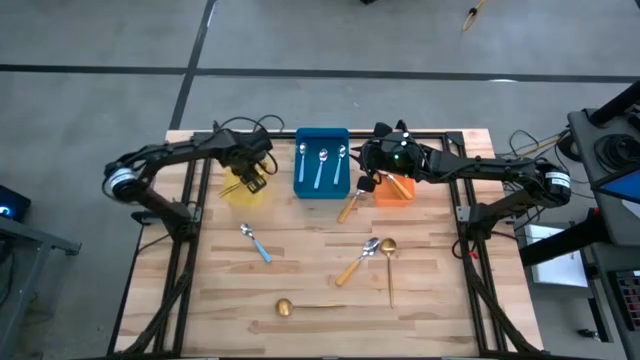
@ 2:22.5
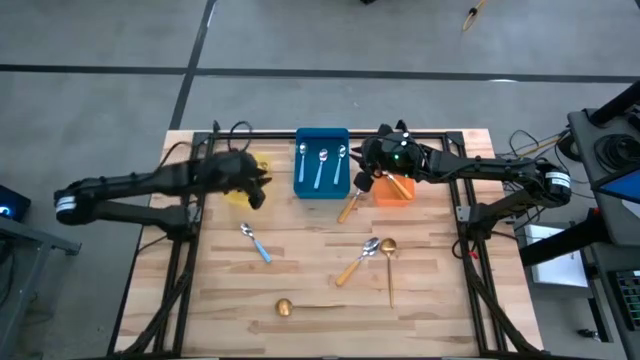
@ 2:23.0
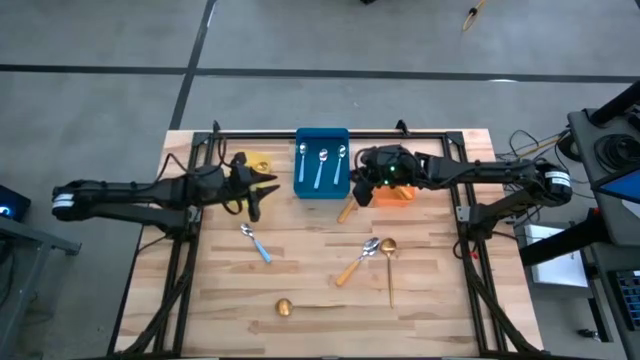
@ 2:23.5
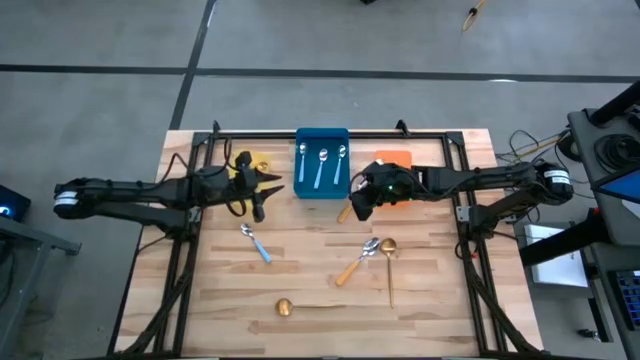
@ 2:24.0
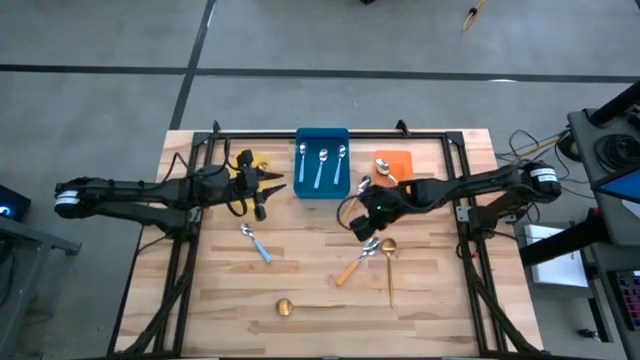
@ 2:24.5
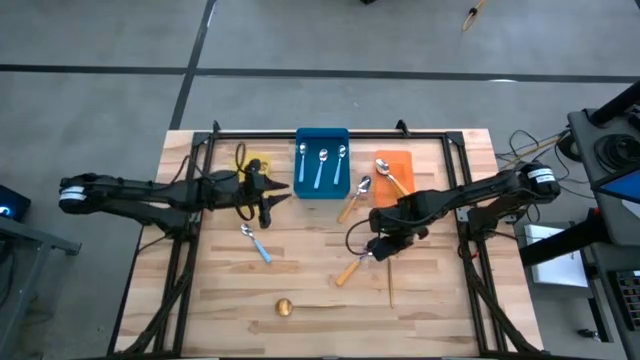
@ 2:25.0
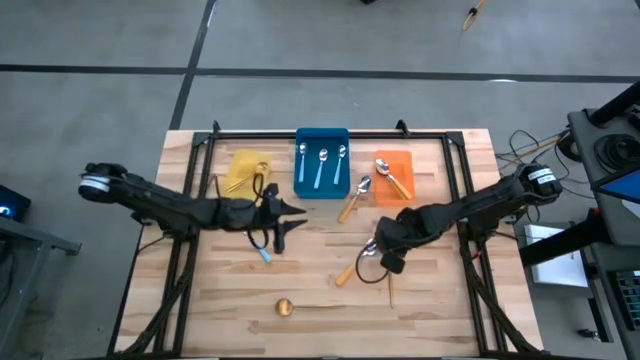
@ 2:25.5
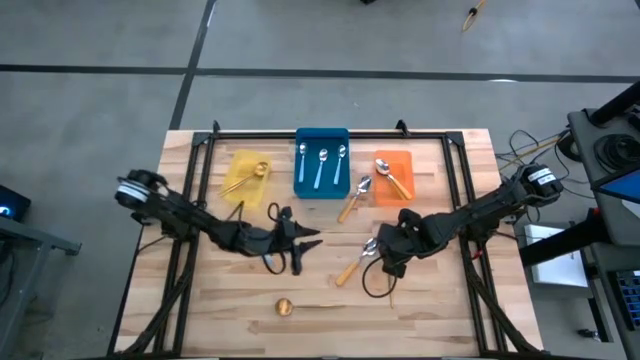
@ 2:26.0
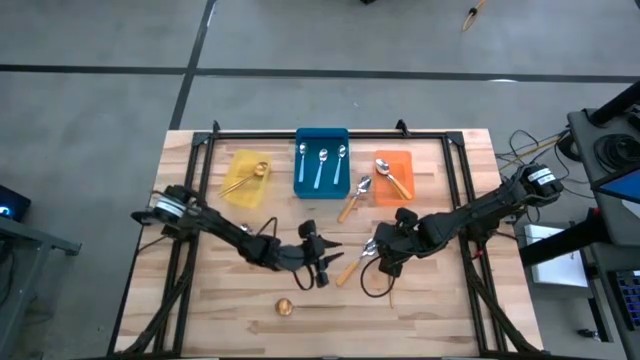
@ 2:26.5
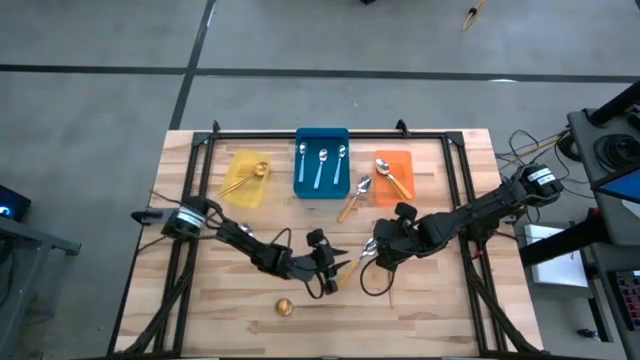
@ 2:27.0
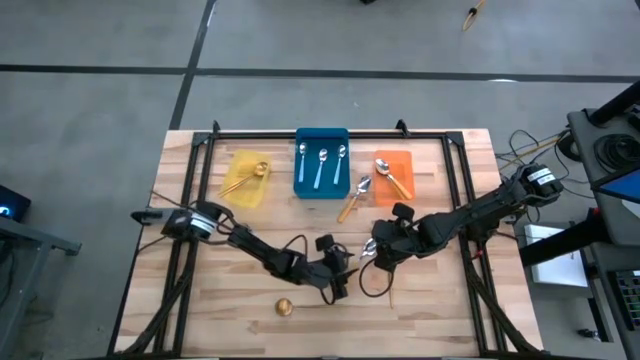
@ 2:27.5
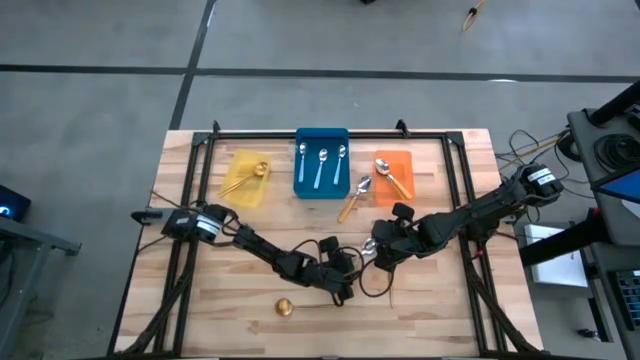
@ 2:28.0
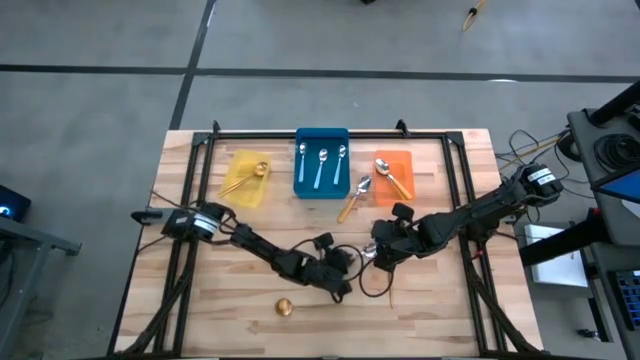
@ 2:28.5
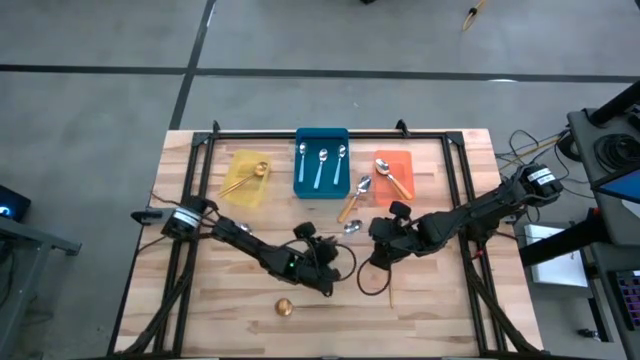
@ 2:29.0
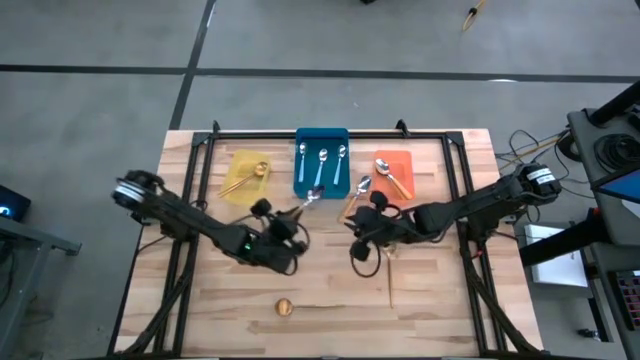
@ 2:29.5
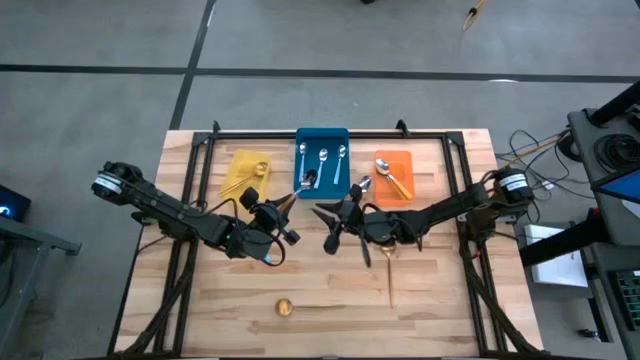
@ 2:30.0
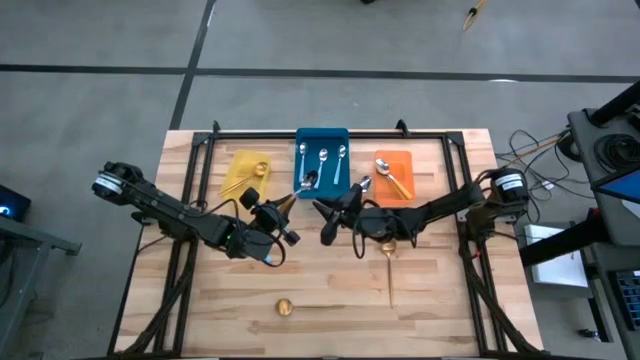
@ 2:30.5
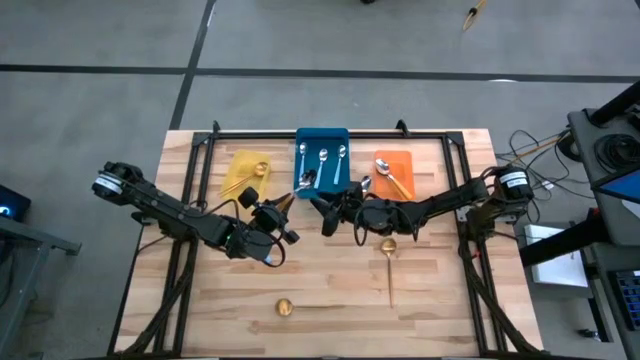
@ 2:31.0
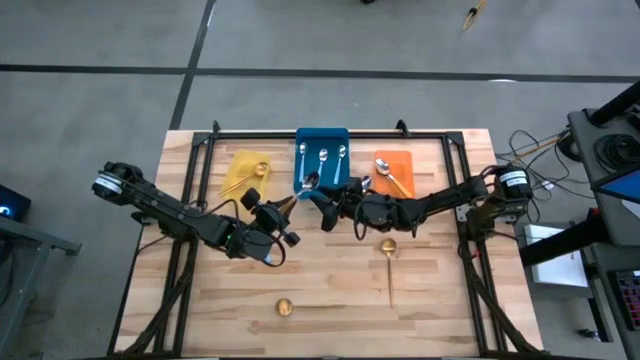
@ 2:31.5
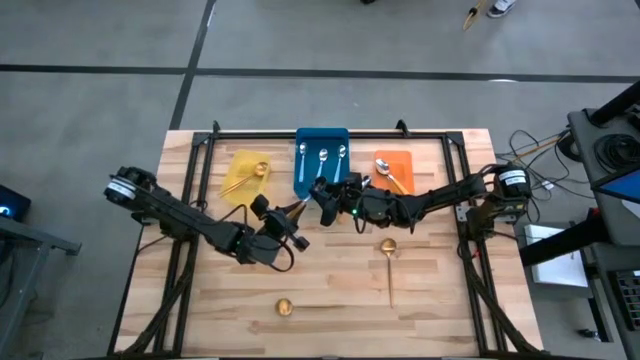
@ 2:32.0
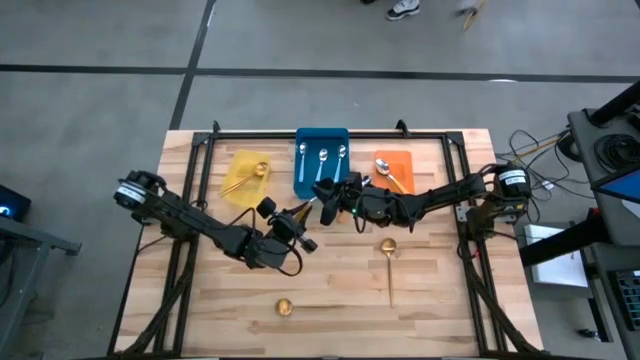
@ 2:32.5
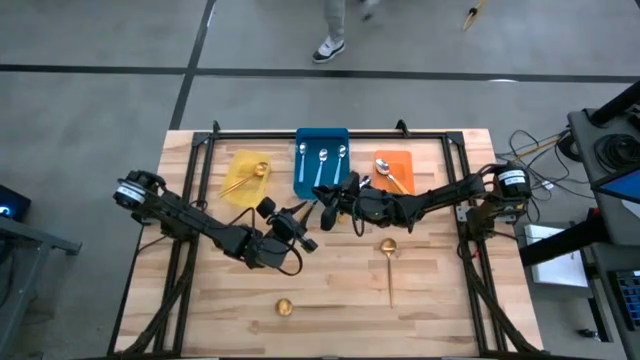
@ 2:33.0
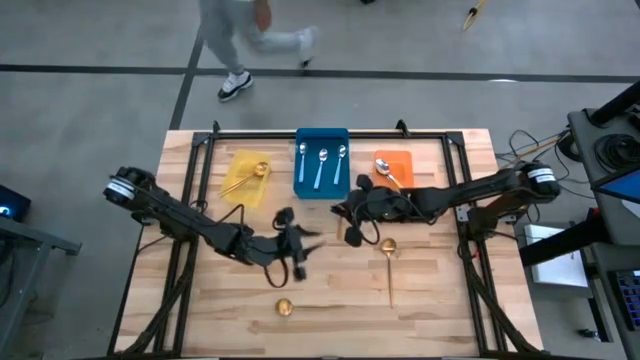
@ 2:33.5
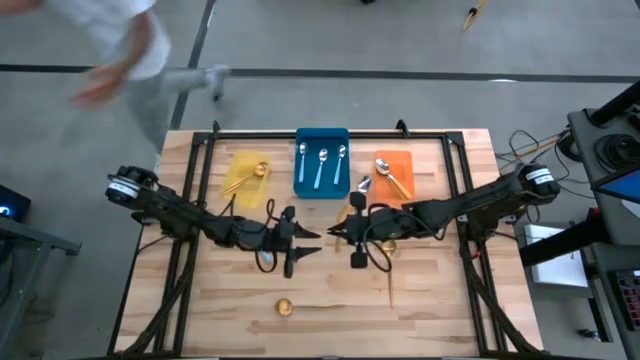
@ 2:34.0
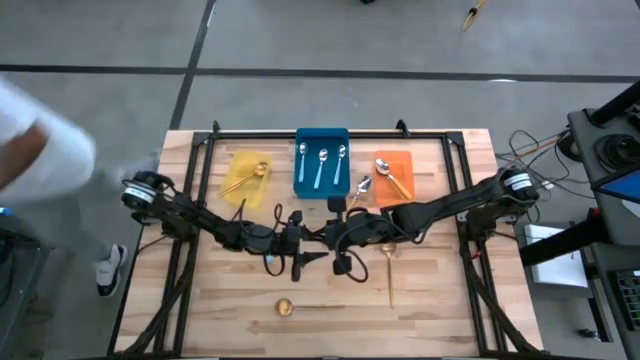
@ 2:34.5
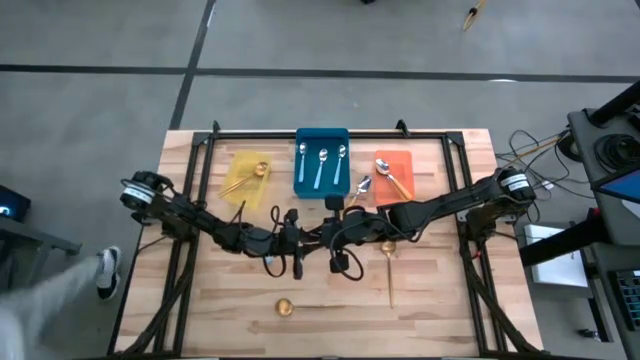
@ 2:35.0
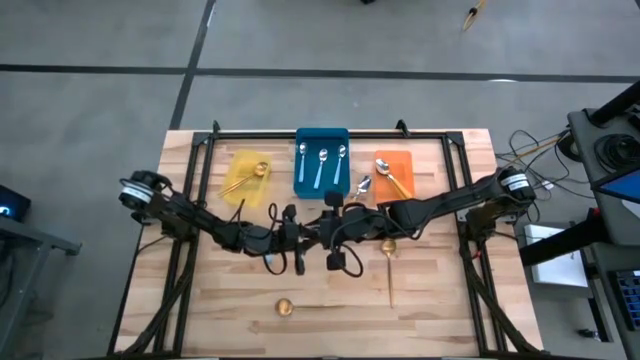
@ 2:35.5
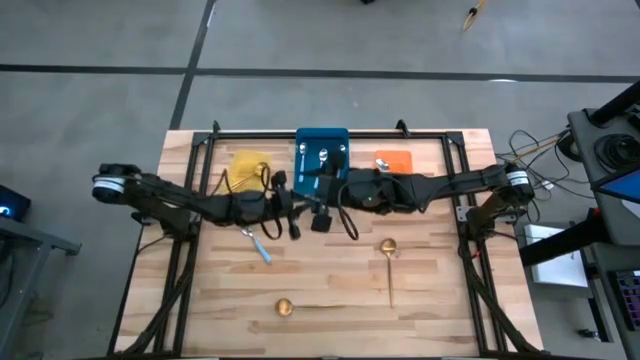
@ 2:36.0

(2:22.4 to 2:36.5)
Task: Sort silverware by color (type)
Put the yellow spoon into the orange bin

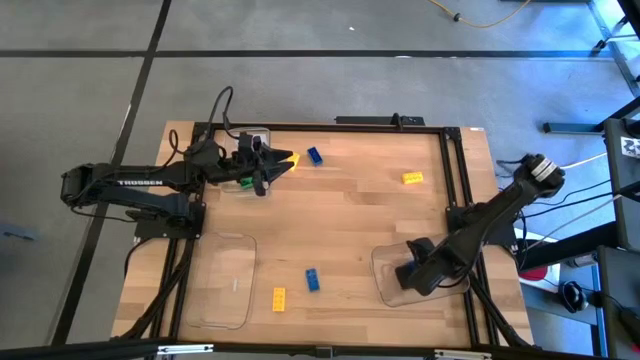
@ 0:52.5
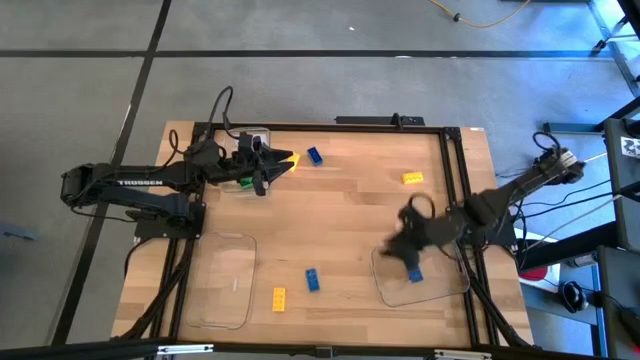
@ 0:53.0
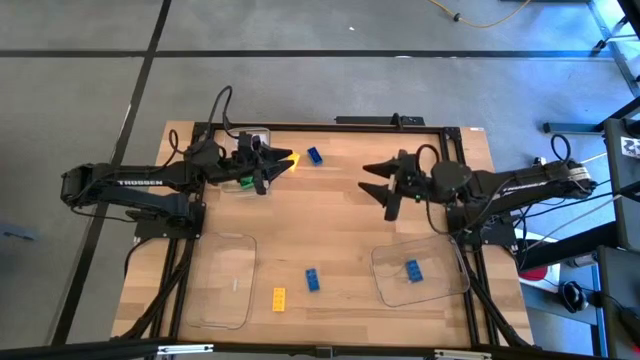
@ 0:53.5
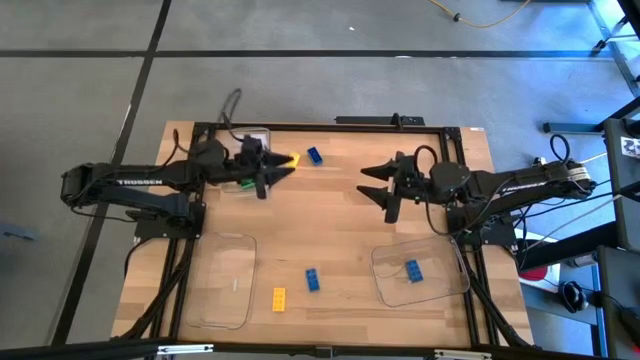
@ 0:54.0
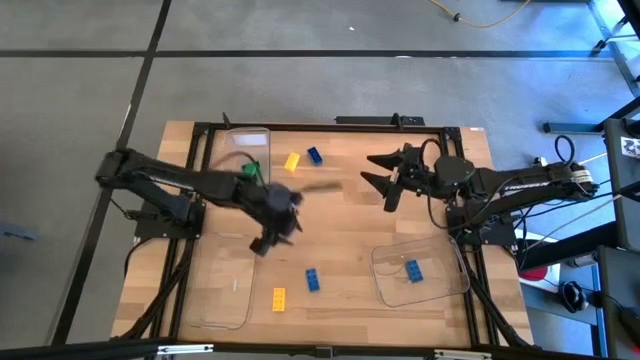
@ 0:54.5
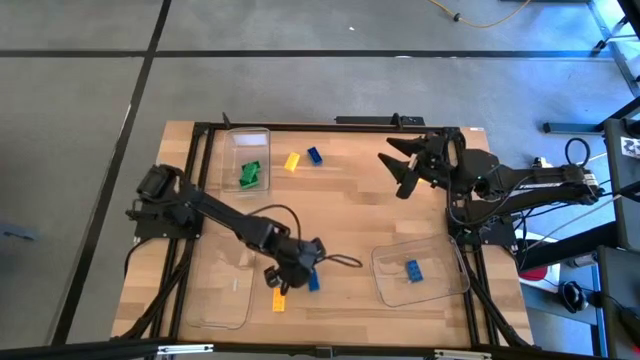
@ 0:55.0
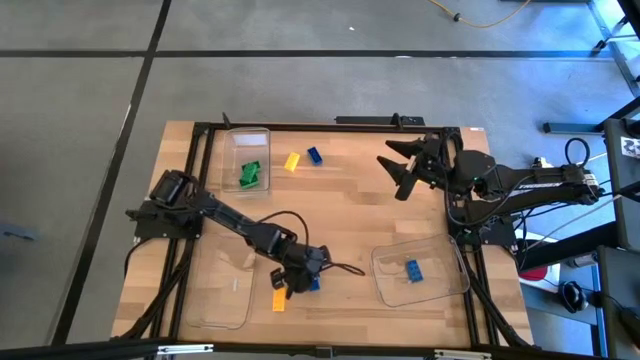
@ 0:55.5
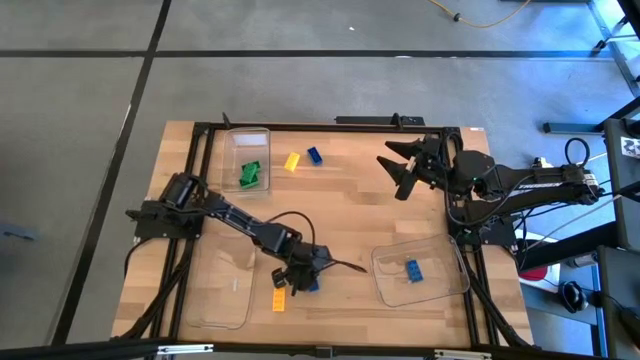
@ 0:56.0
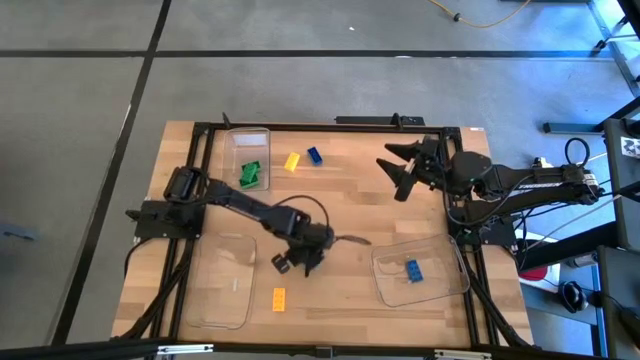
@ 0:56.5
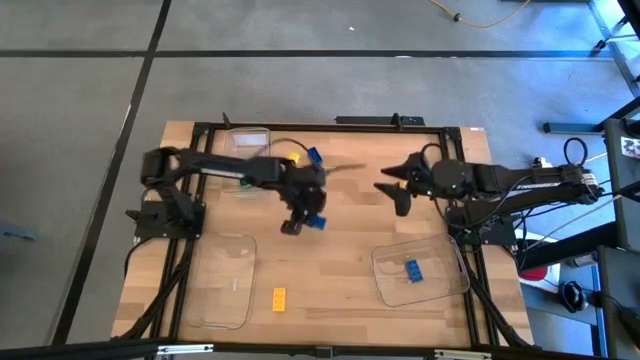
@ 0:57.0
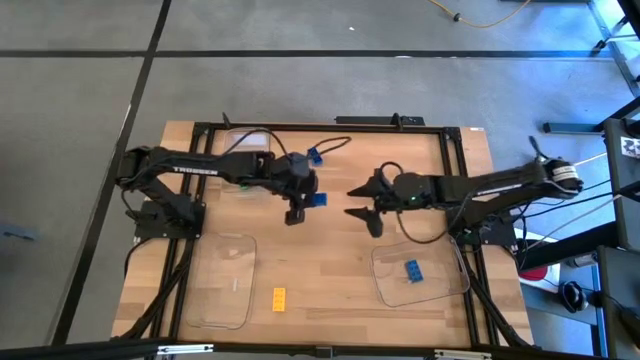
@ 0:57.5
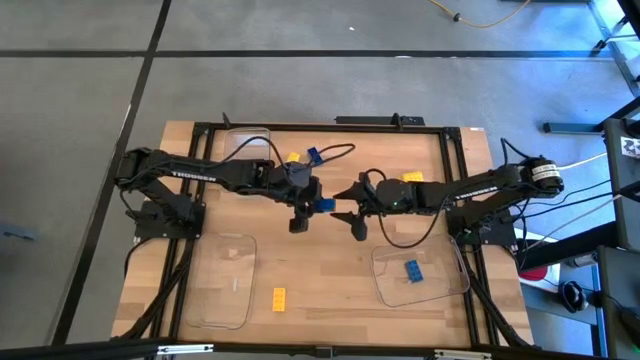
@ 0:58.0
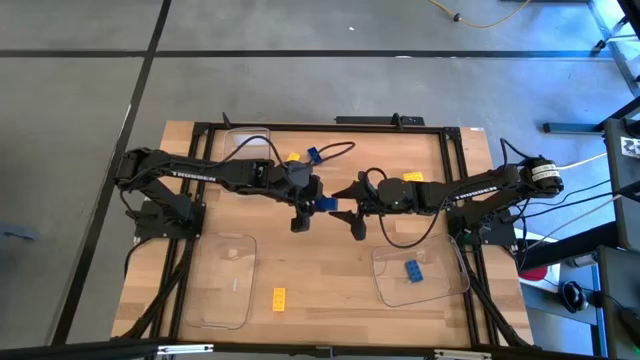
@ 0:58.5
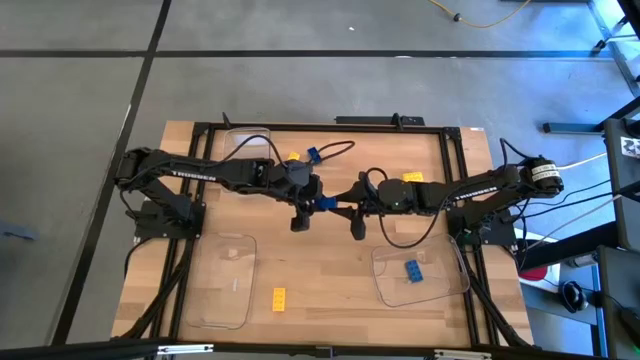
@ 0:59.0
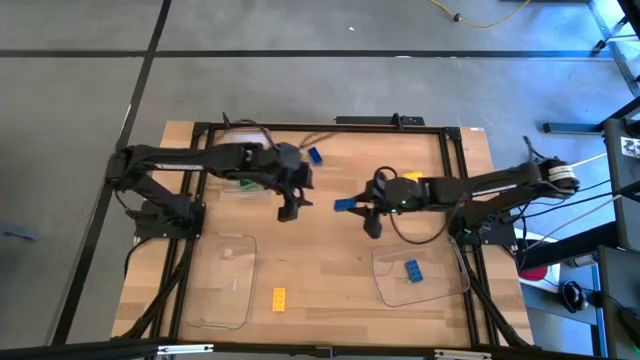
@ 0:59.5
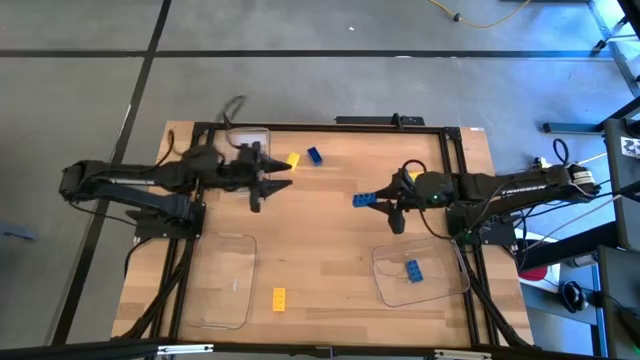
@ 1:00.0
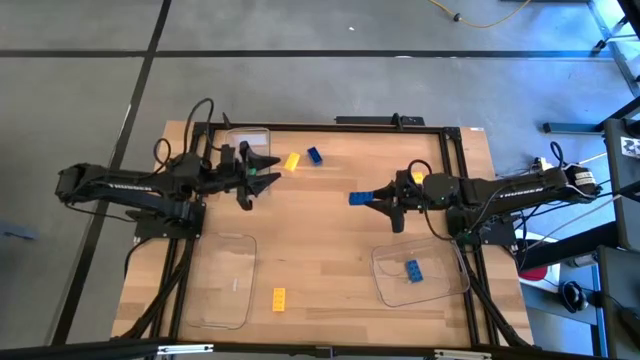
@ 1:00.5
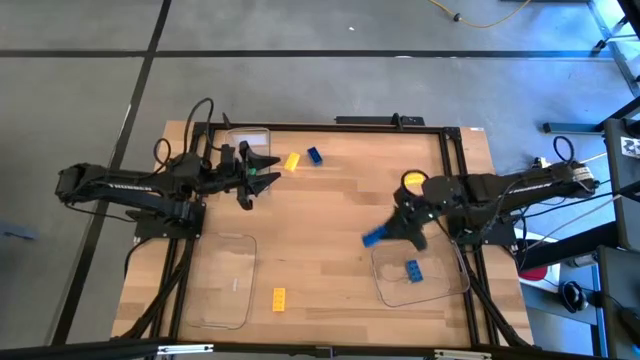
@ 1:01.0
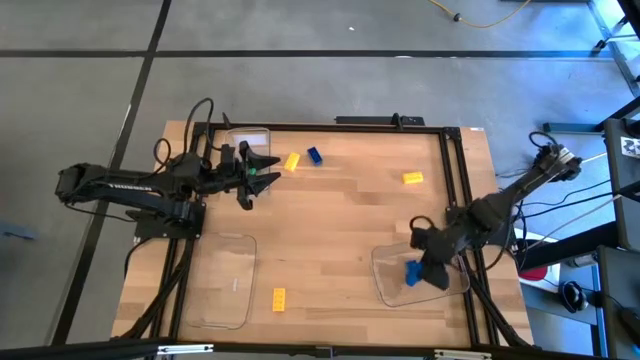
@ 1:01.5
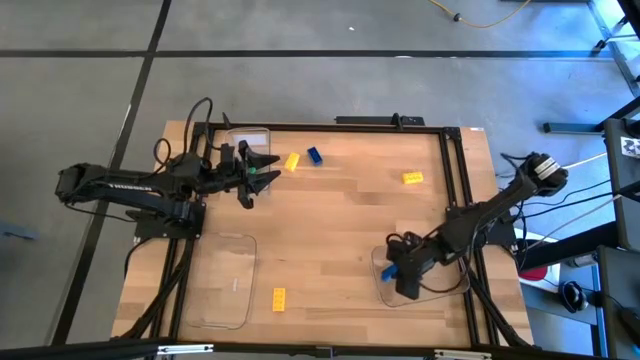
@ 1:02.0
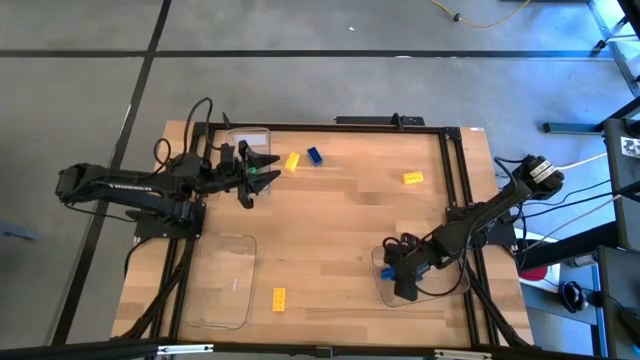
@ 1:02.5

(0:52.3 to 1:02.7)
Task: Sort & place blocks by color
Put the bottom blue game piece into the bottom right transparent bin
